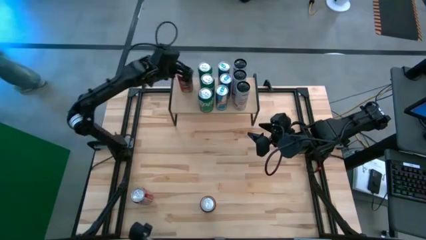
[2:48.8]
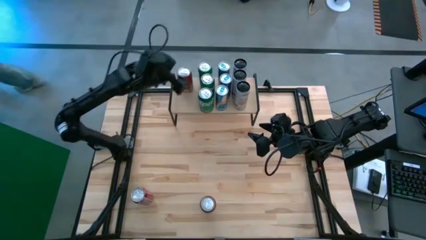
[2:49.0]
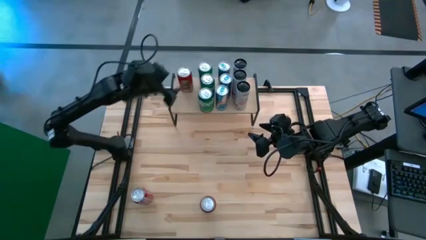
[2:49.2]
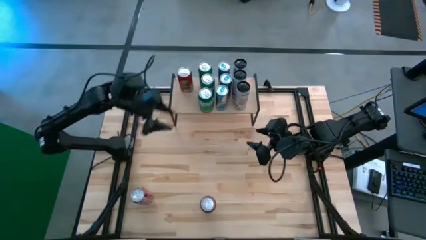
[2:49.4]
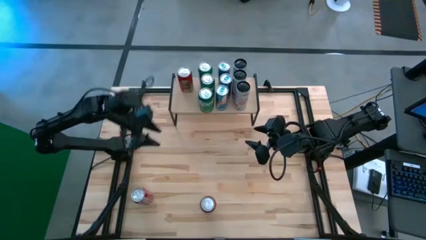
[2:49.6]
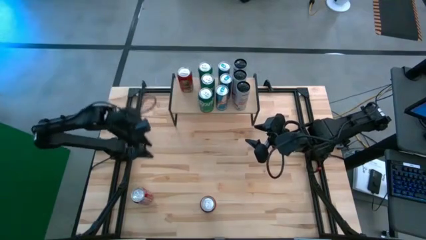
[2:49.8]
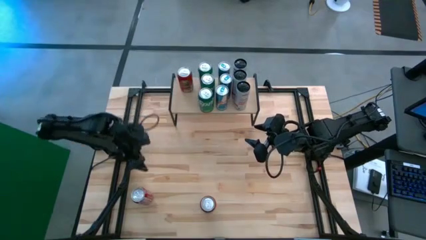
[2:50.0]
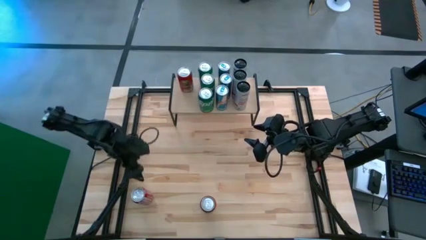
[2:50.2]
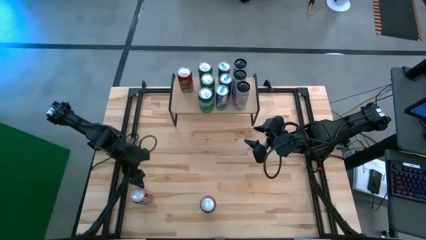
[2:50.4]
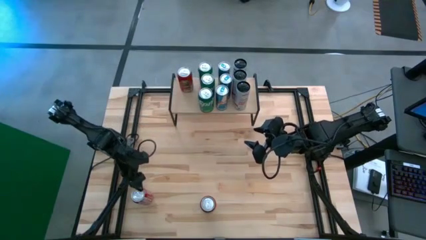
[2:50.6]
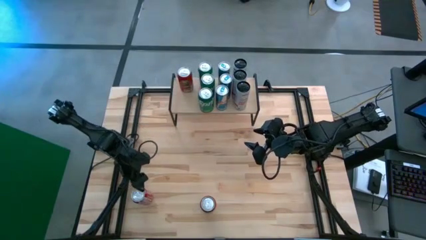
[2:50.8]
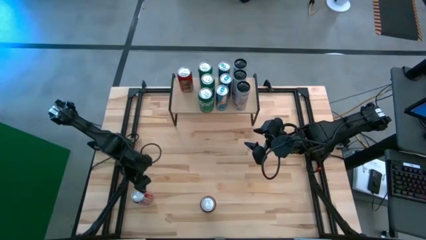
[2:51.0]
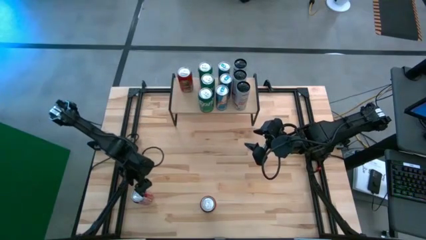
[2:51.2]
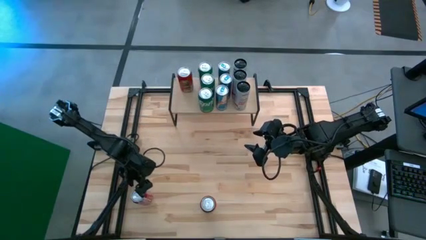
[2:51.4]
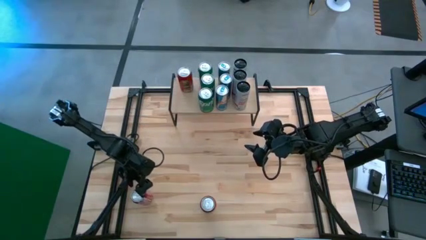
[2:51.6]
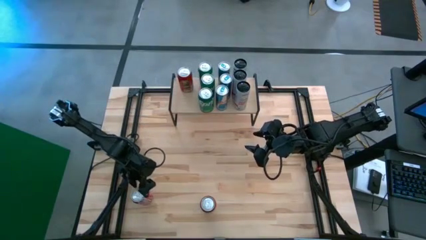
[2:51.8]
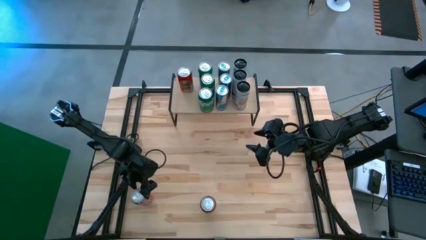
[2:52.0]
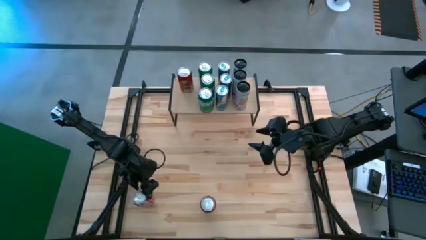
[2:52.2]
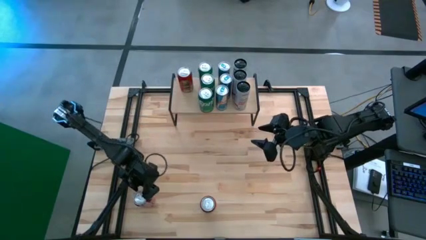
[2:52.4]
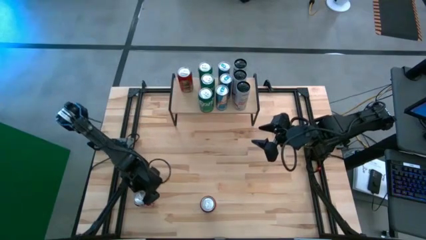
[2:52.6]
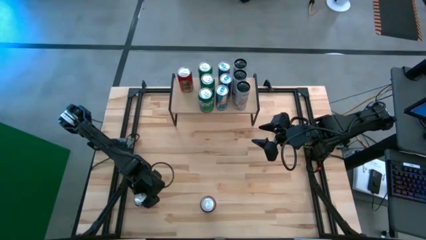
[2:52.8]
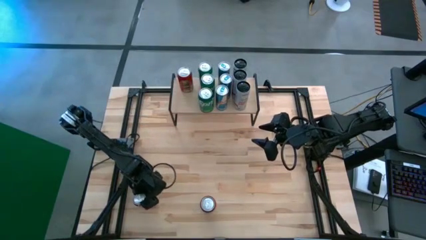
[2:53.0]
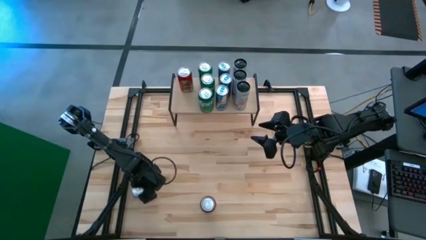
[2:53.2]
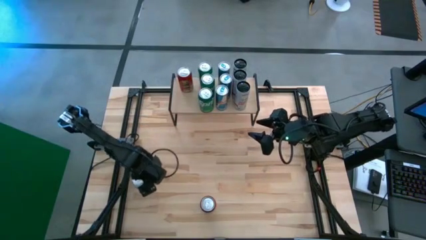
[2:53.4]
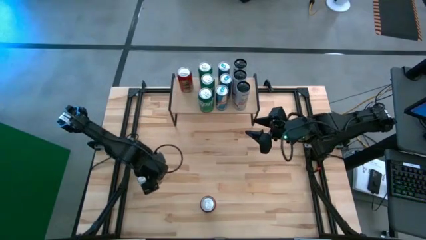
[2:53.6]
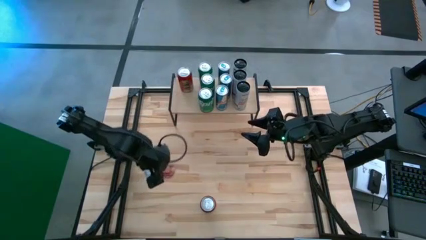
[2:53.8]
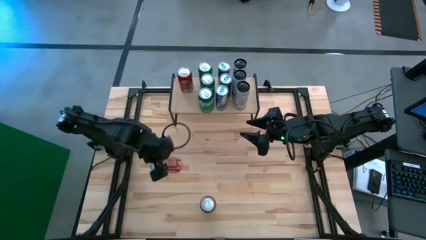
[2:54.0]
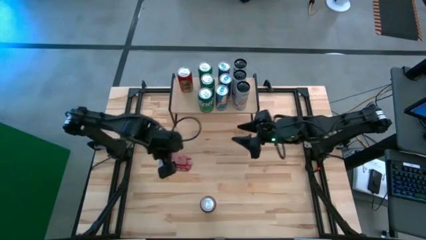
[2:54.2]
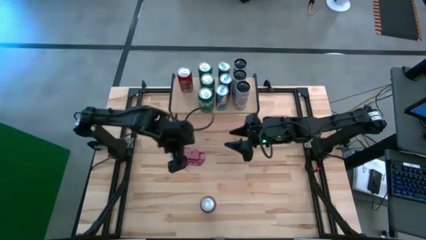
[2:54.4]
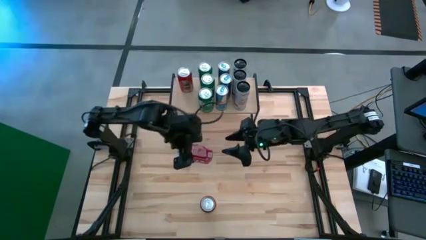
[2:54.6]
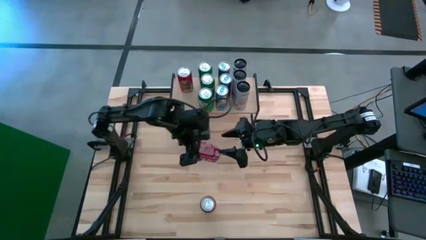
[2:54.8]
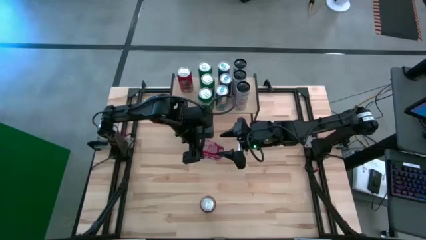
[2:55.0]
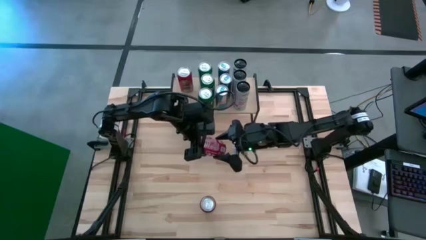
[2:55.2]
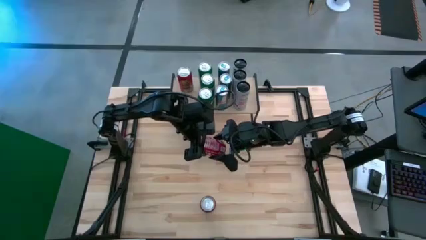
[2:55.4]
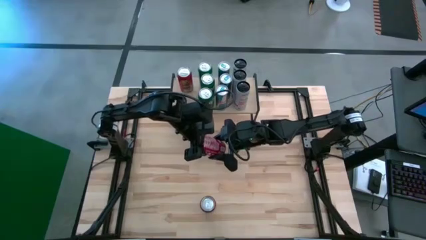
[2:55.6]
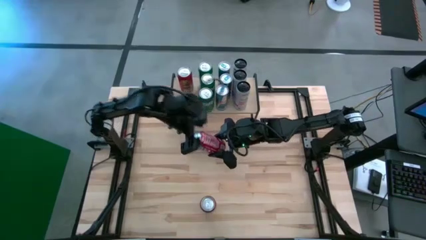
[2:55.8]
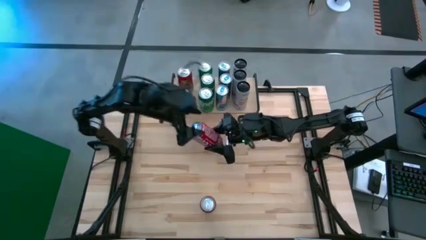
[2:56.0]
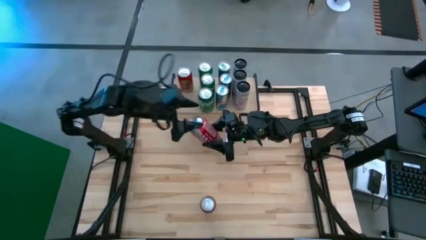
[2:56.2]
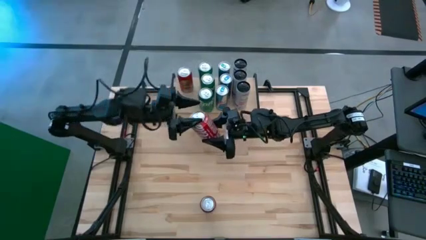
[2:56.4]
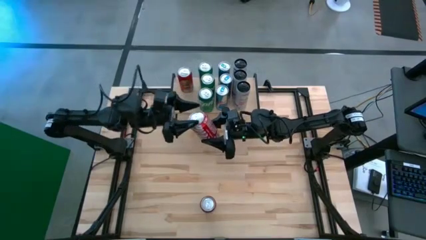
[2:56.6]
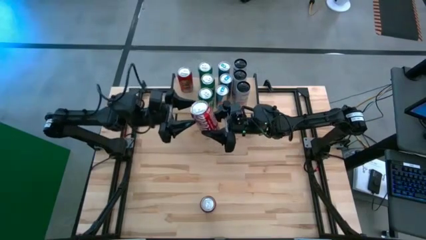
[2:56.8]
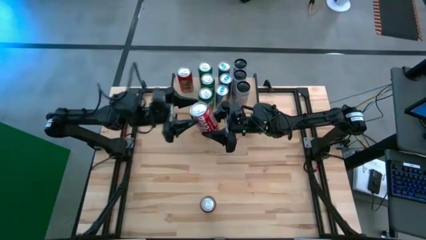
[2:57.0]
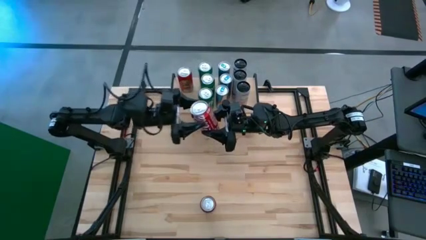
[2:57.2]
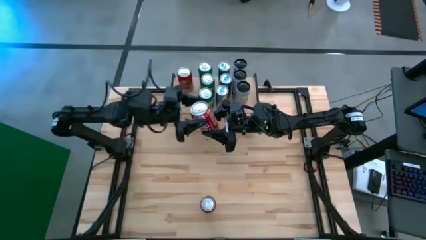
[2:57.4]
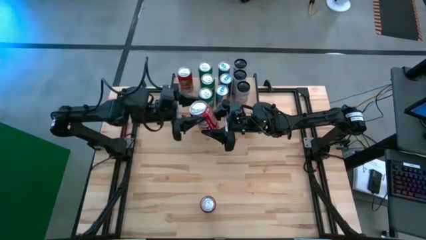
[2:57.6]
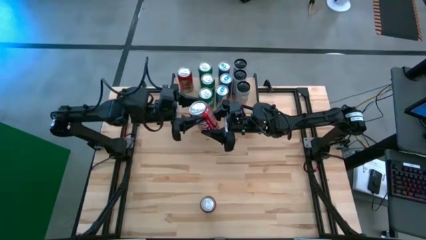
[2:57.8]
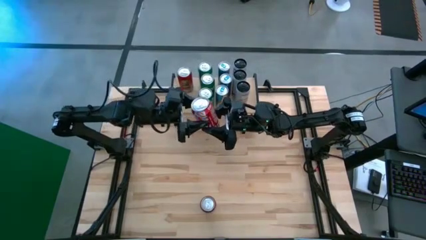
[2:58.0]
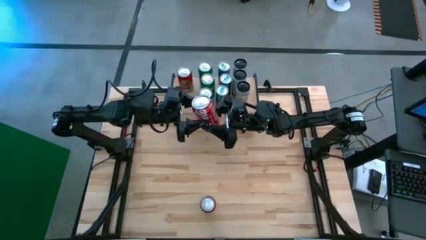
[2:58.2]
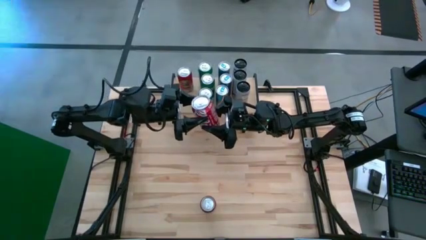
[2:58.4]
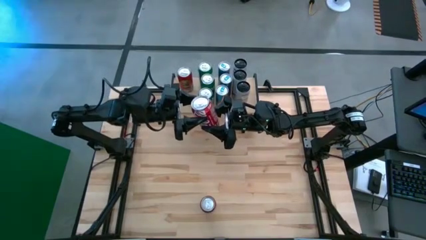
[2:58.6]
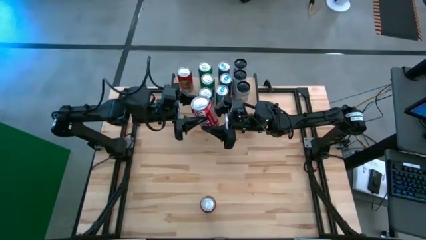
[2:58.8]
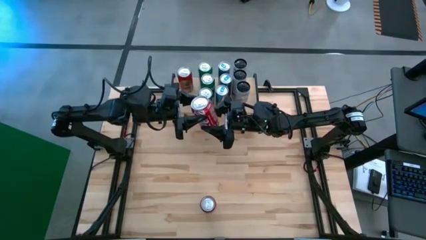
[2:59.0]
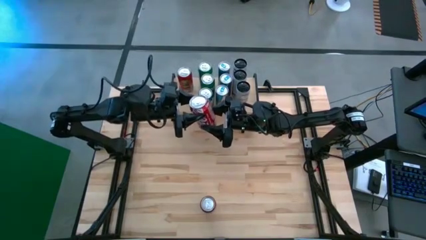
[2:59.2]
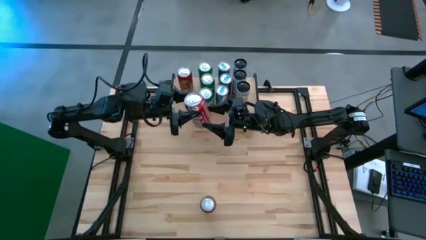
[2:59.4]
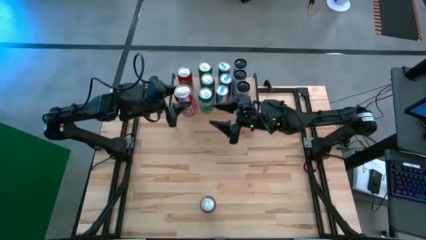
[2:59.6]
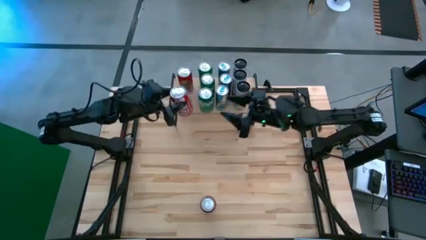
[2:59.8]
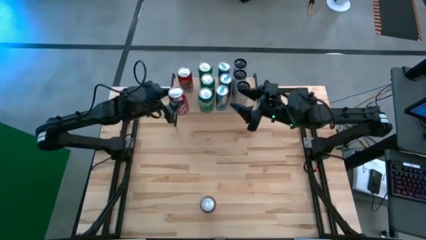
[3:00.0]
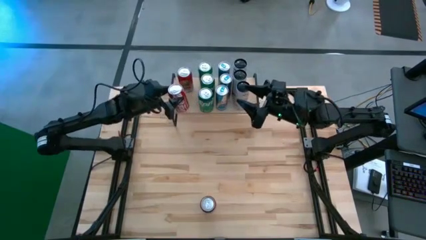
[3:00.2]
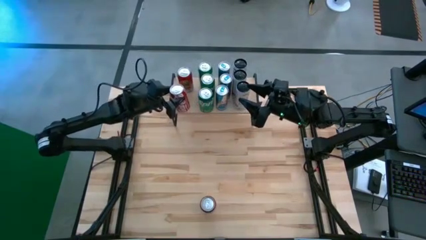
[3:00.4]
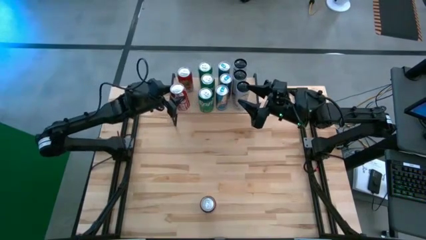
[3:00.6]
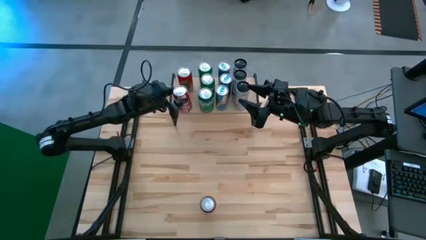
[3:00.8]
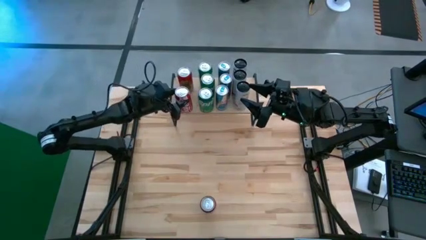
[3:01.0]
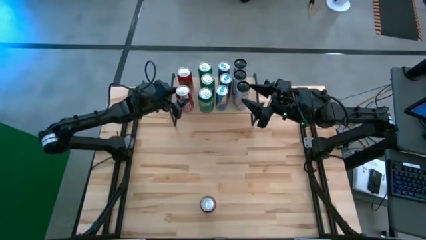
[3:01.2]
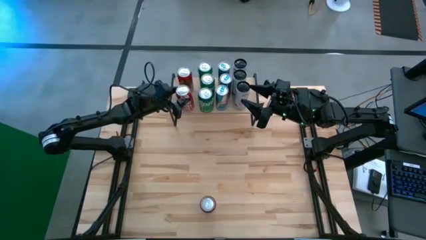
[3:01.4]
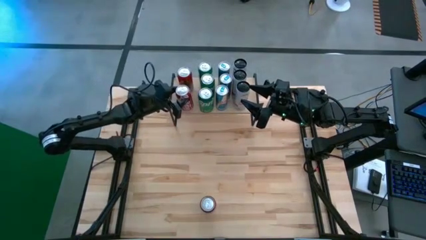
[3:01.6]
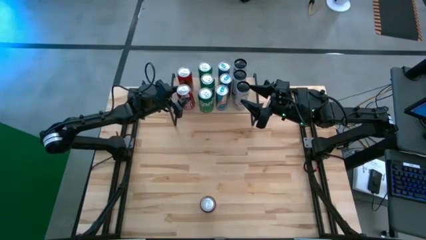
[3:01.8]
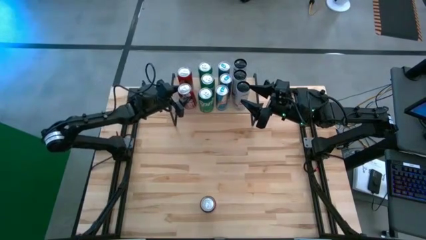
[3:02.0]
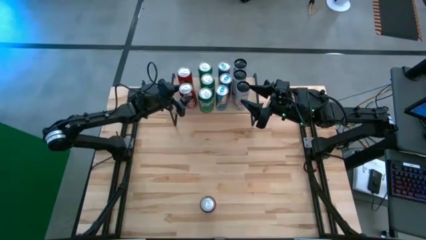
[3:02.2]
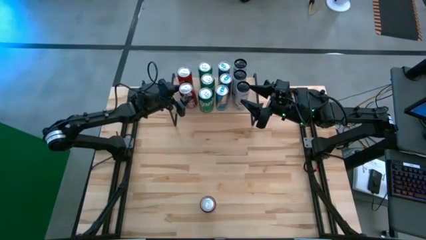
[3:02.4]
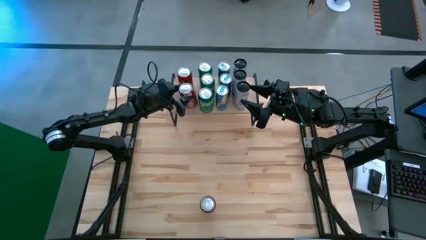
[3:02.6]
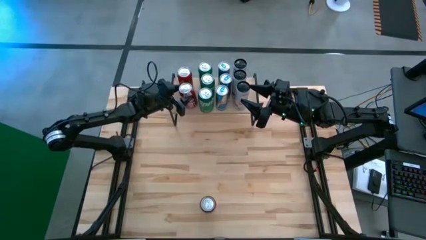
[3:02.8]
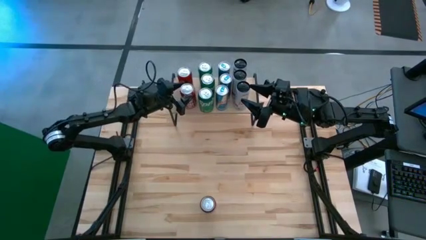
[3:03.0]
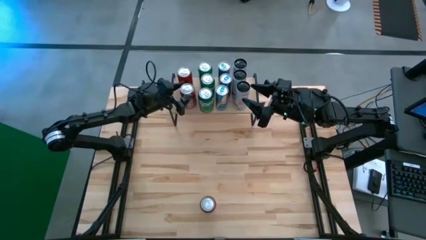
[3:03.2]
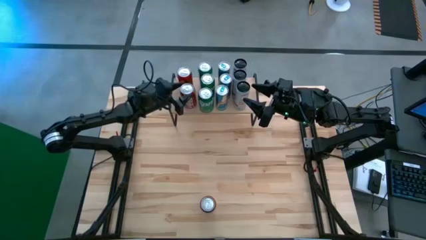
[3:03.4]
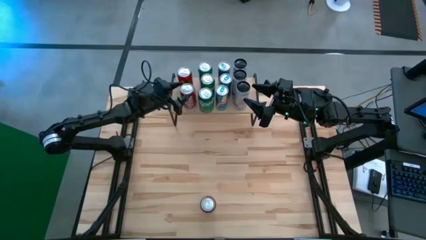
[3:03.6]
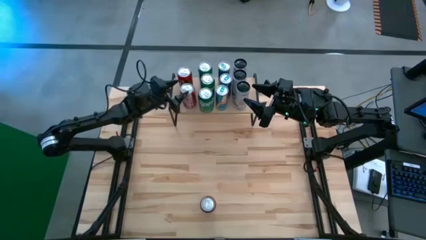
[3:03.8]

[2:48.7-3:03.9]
Task: Place canned beverage on shelf
Put the left red soda can on the shelf aligned with the other red soda can
